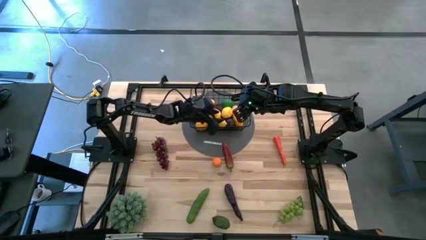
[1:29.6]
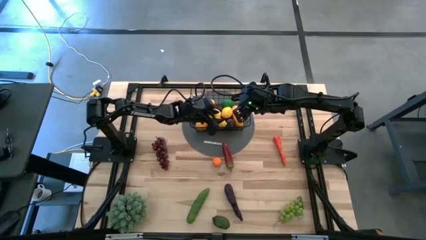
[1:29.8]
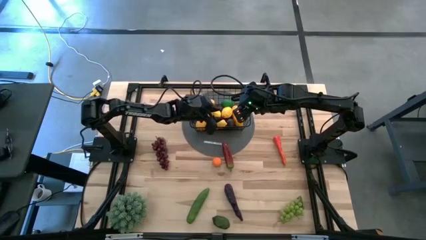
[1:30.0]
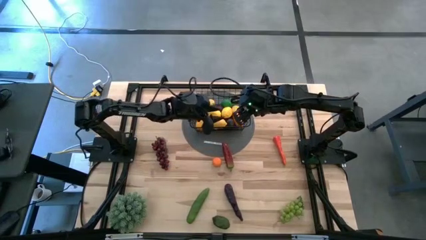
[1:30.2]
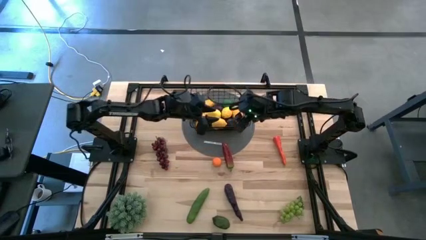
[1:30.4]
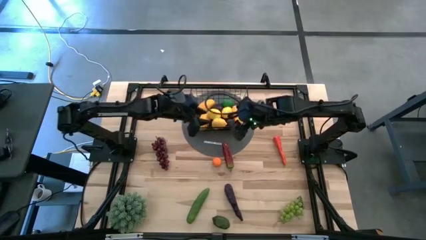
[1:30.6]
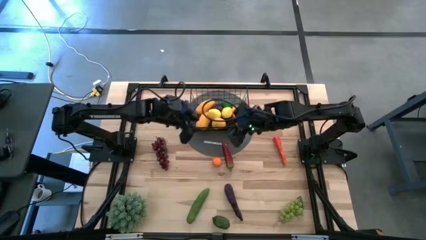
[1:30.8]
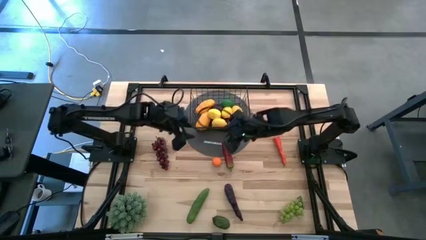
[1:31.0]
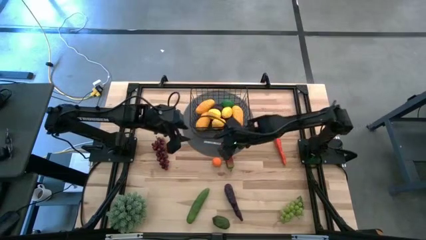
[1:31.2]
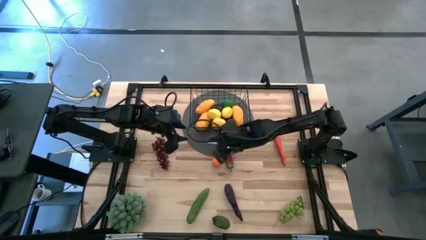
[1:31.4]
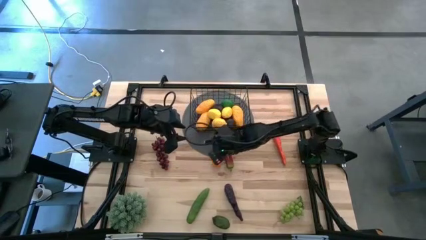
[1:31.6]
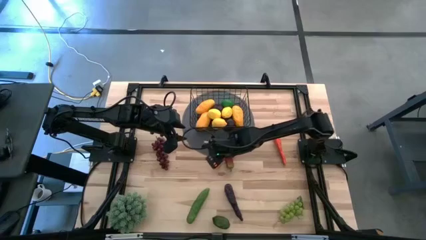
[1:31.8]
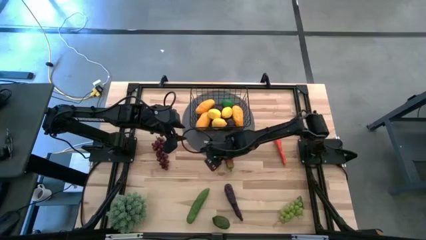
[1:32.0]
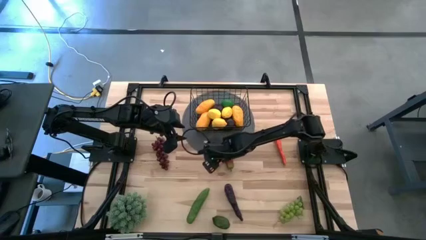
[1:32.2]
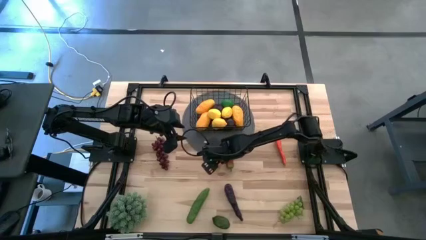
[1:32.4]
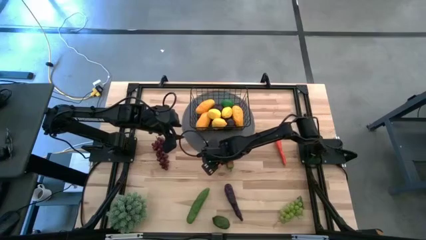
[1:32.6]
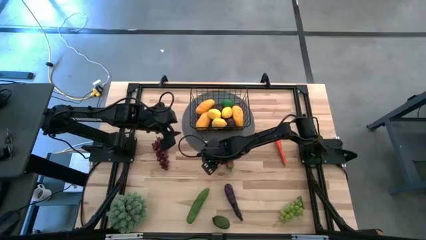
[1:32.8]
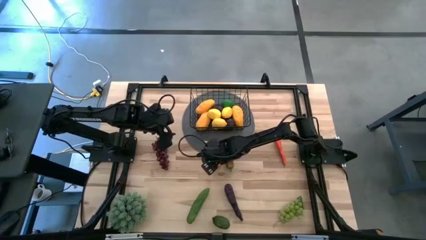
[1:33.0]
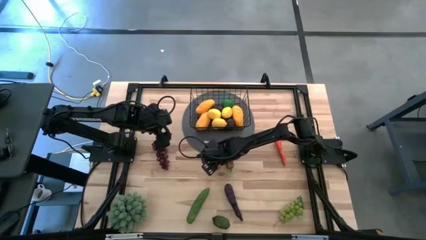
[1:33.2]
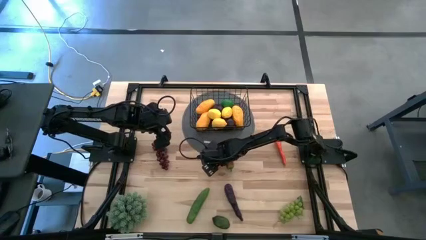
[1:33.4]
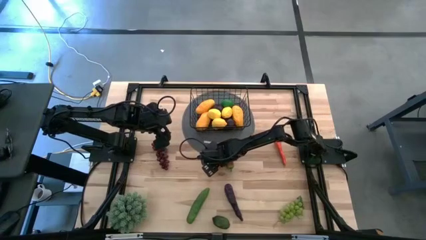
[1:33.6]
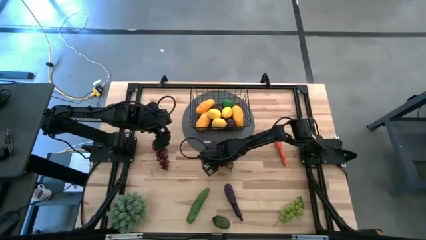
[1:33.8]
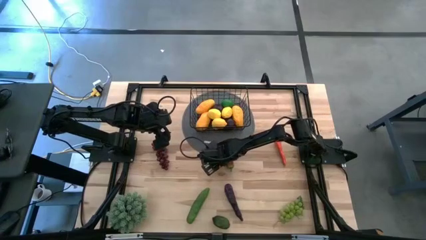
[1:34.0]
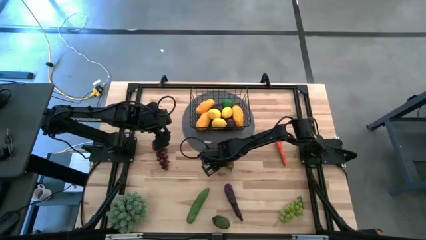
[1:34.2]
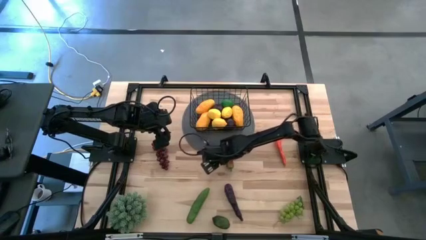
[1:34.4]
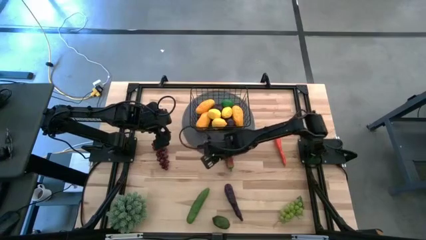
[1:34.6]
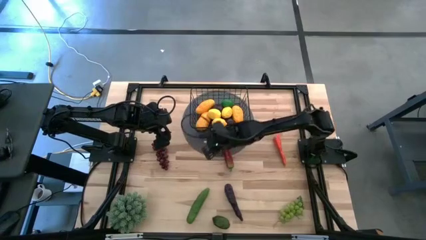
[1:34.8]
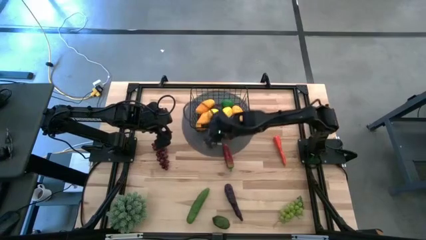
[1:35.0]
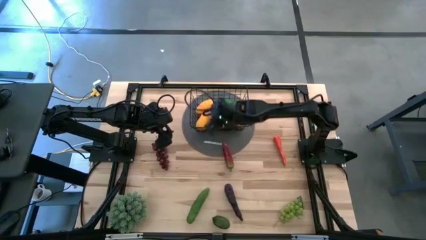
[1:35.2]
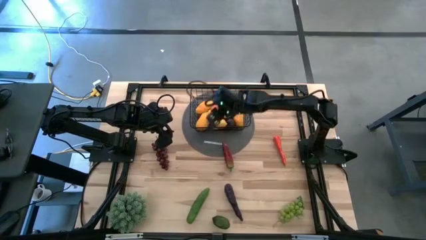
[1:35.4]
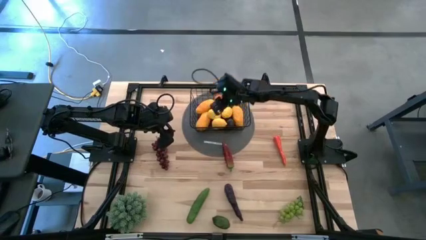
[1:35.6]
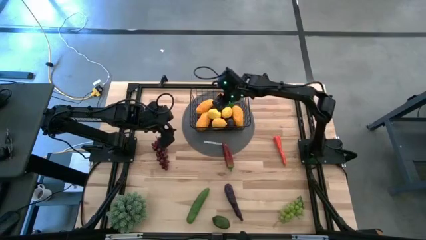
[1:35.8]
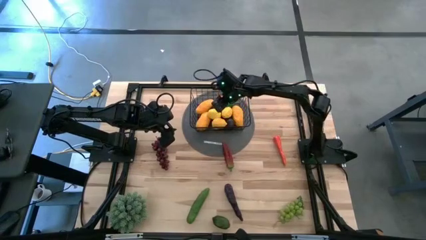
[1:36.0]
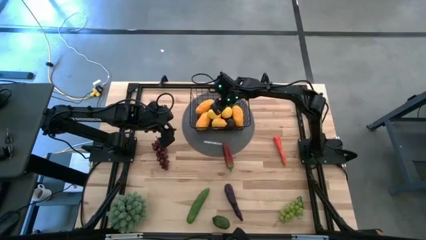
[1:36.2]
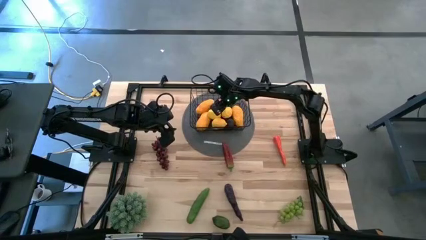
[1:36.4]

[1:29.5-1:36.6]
Task: Build produce basket
Put the orange into the black wire basket

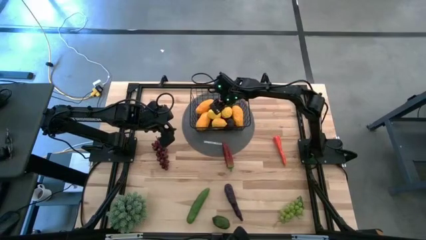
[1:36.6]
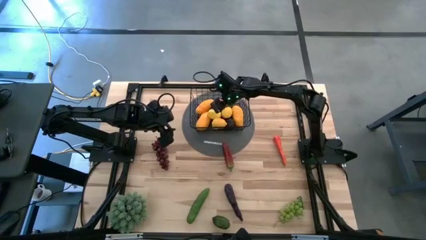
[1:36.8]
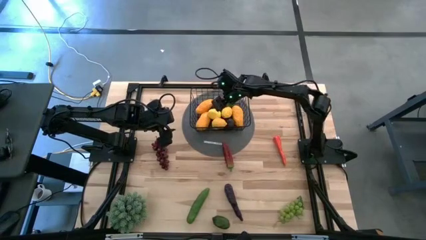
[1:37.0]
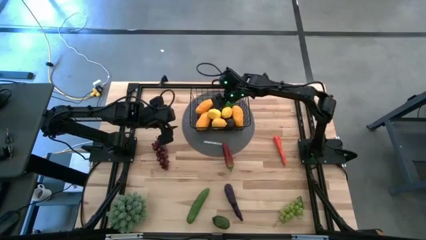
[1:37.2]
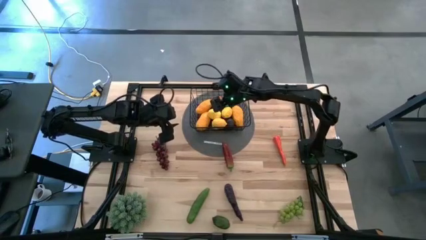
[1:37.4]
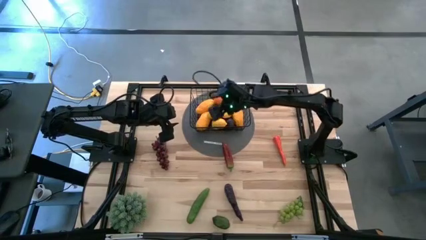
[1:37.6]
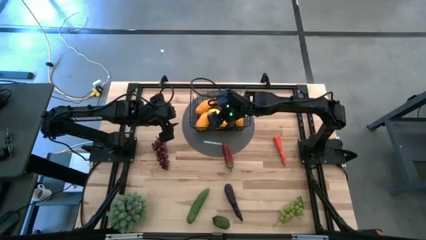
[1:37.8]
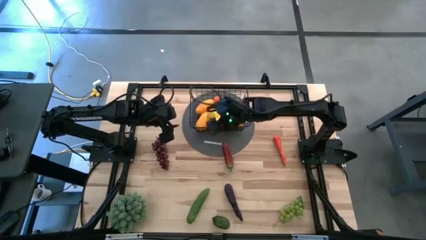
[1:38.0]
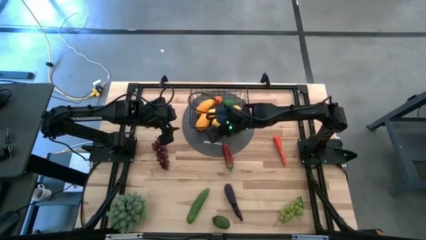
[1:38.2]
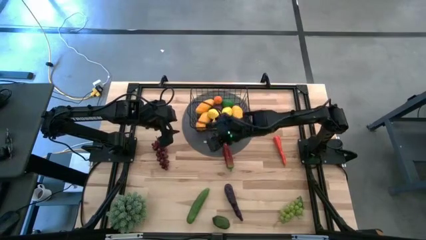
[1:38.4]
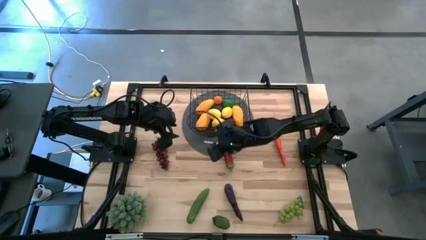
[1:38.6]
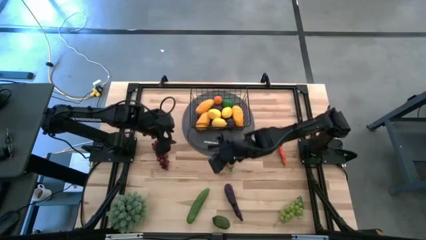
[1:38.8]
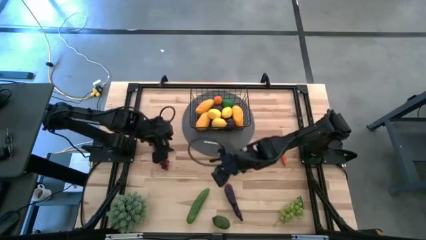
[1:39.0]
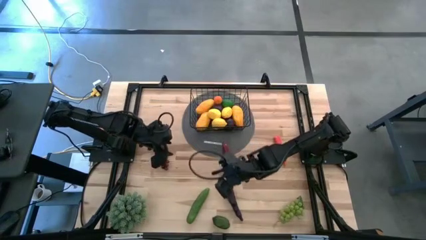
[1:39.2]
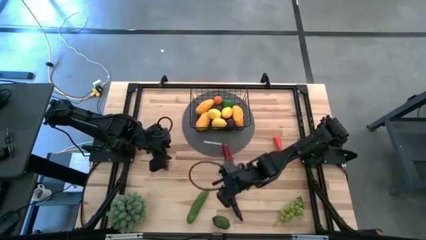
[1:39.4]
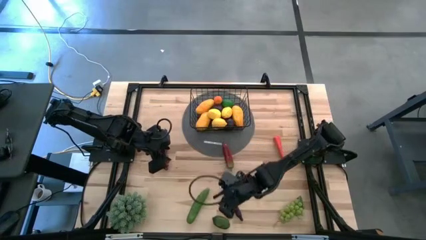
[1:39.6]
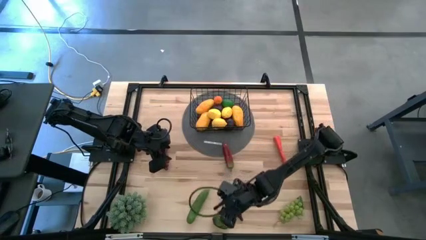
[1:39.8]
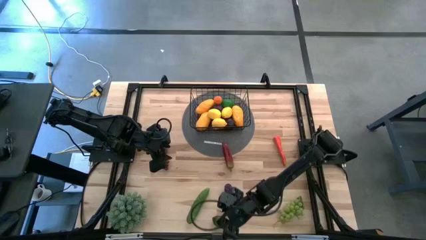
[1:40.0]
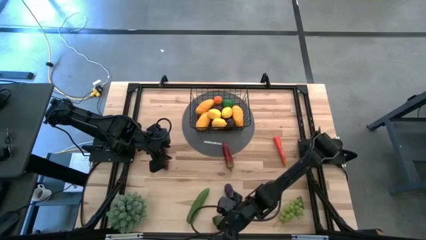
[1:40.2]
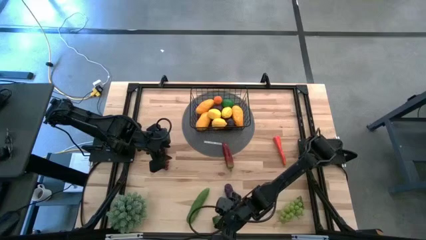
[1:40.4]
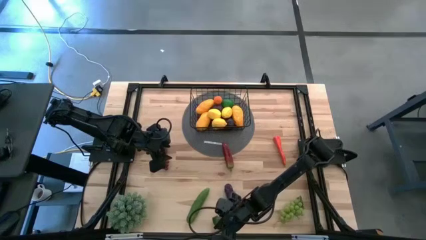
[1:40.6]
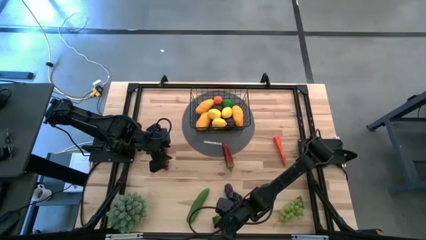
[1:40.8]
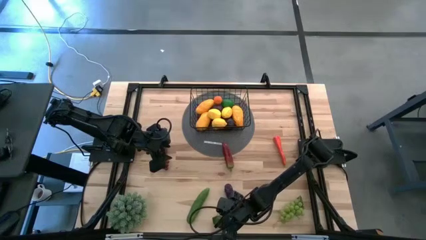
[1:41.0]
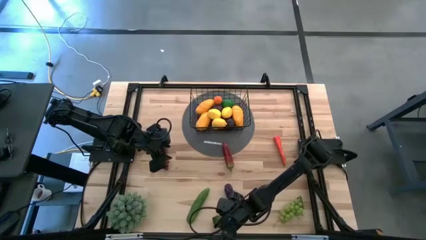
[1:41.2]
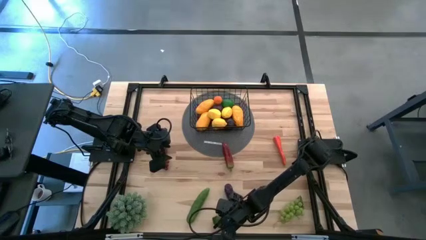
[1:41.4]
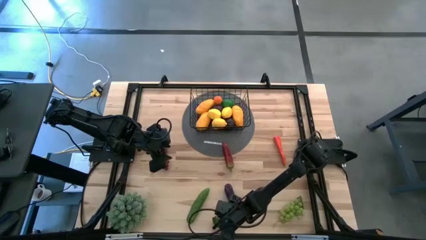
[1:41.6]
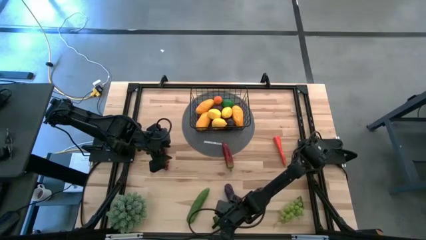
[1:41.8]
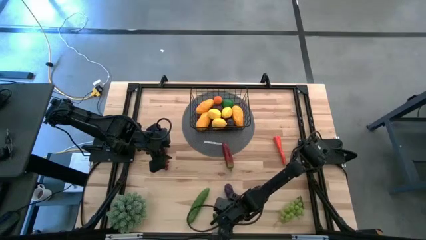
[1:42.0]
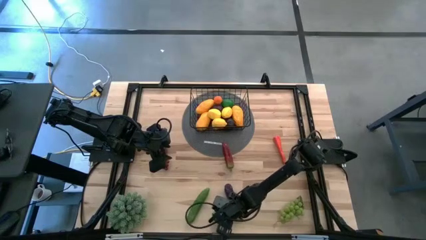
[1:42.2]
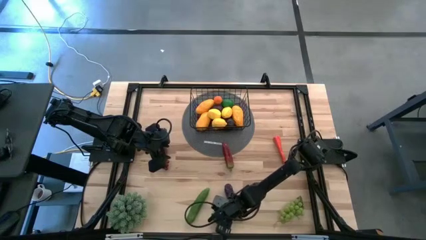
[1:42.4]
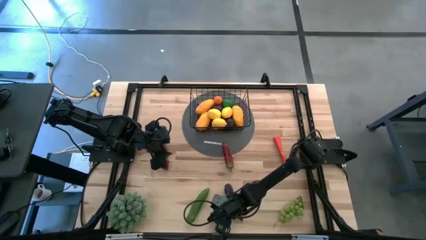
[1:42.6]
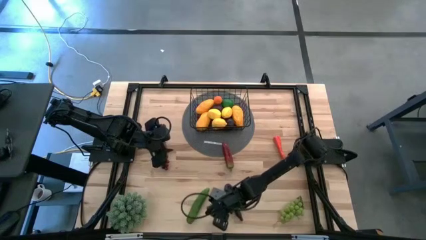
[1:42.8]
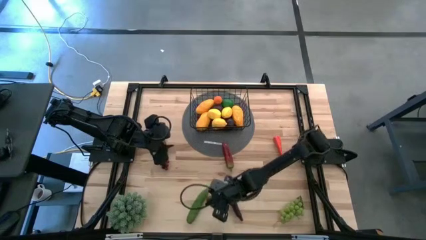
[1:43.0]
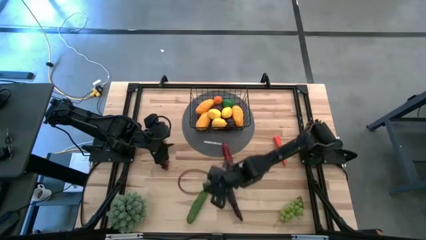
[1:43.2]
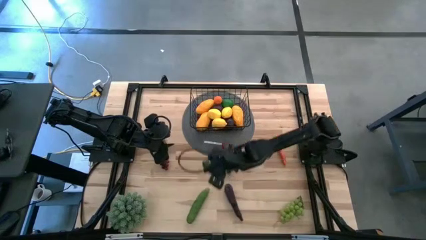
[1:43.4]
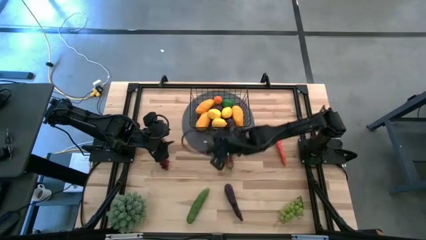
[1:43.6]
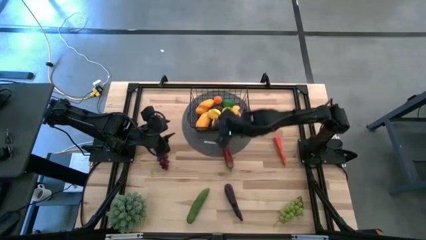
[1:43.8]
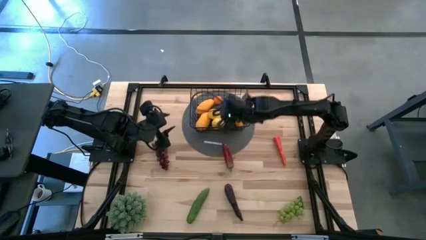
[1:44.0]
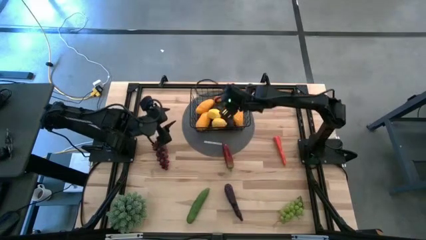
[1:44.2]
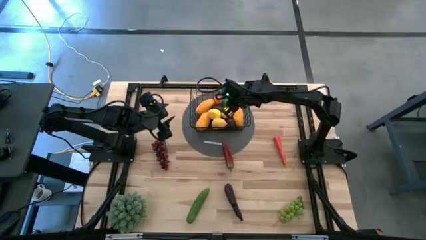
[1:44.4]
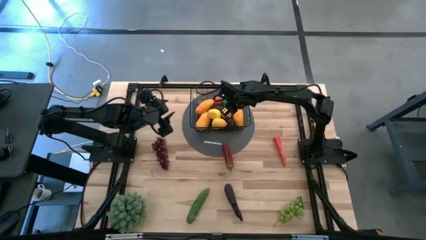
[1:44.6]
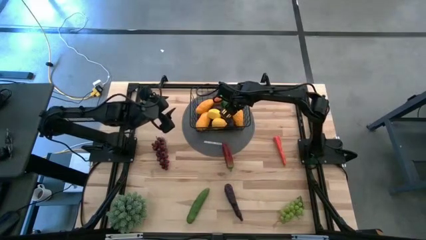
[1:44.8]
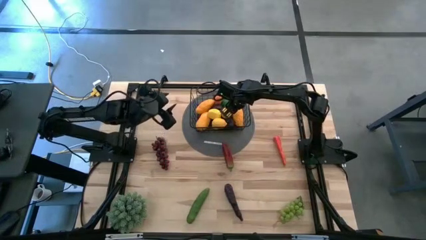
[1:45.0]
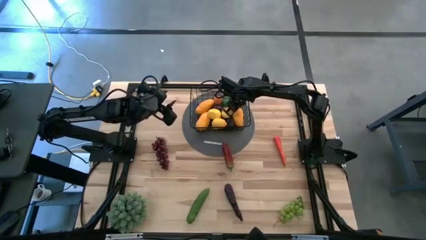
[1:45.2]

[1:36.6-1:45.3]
Put the green lime into the black wire basket
